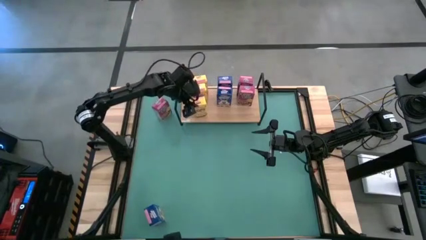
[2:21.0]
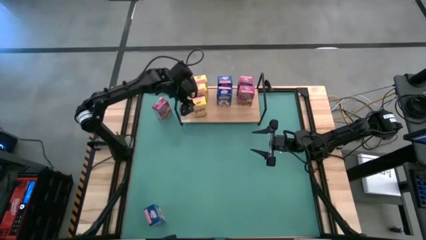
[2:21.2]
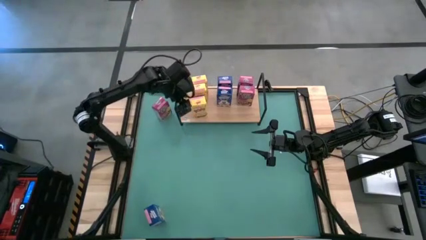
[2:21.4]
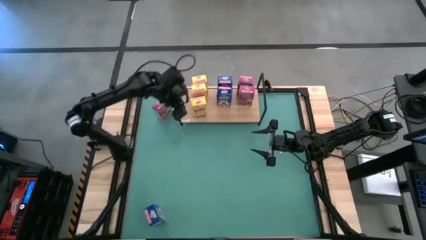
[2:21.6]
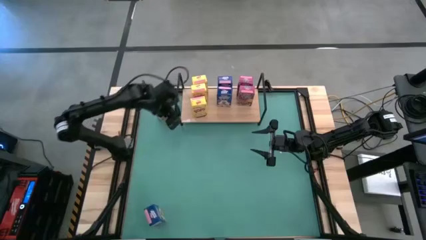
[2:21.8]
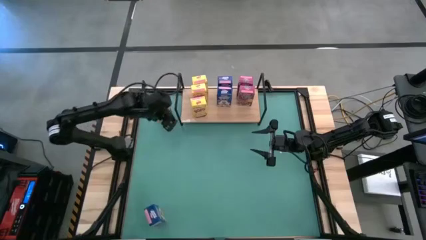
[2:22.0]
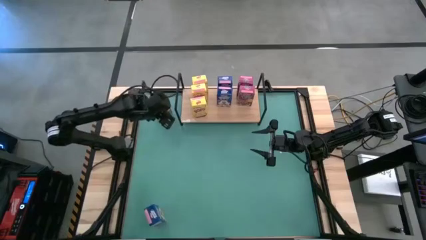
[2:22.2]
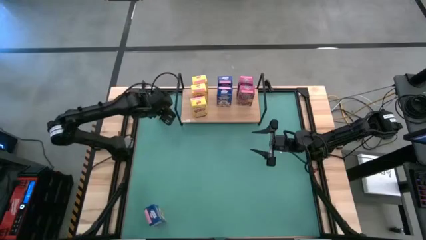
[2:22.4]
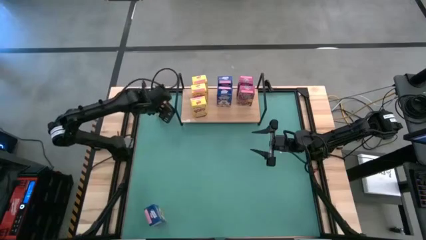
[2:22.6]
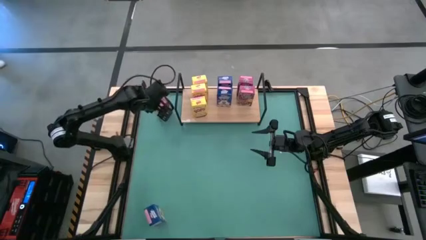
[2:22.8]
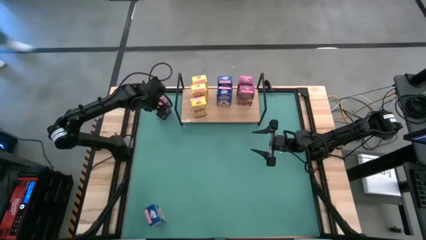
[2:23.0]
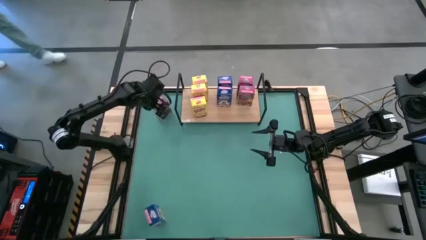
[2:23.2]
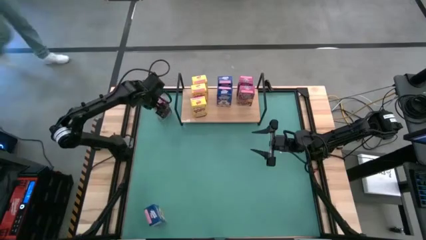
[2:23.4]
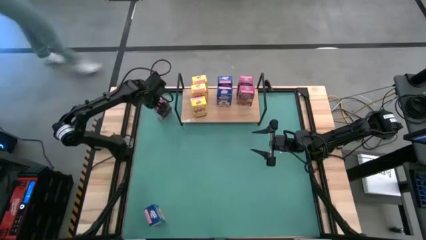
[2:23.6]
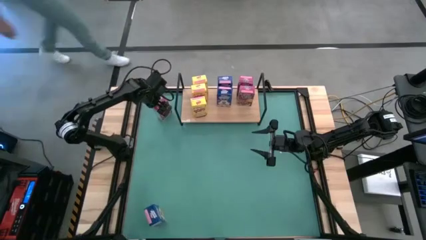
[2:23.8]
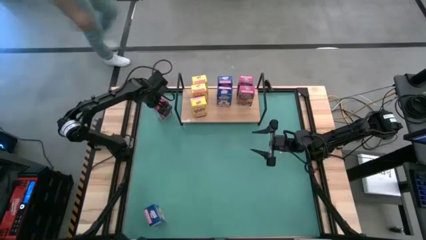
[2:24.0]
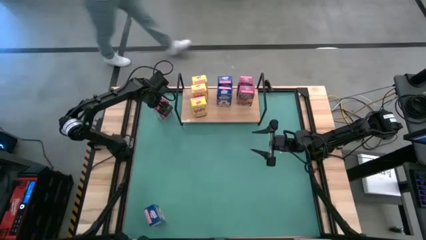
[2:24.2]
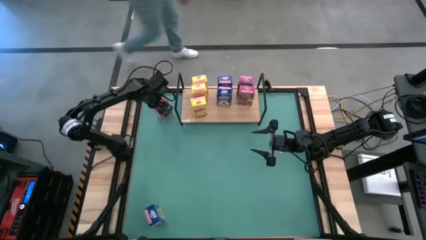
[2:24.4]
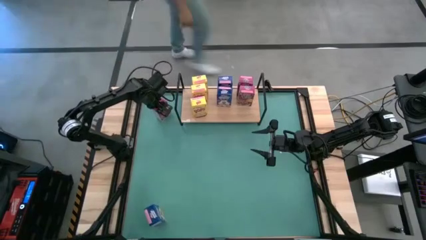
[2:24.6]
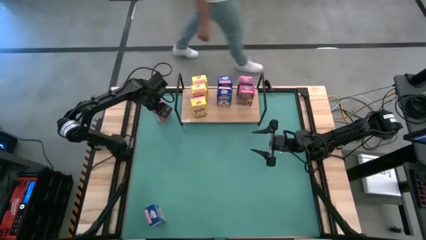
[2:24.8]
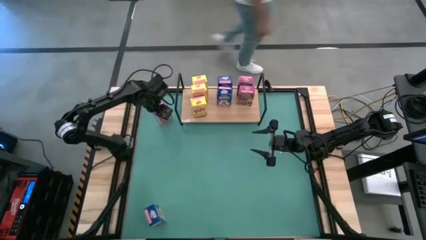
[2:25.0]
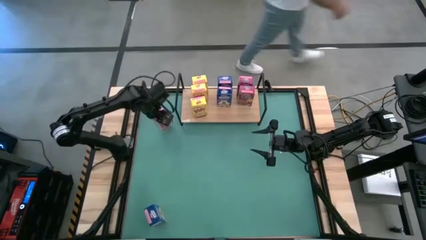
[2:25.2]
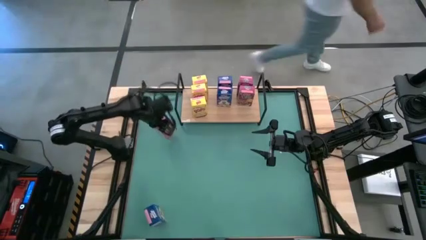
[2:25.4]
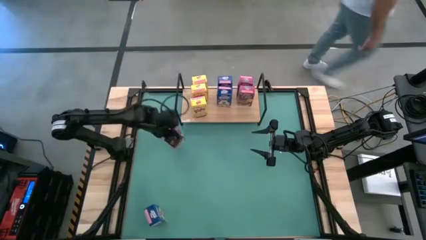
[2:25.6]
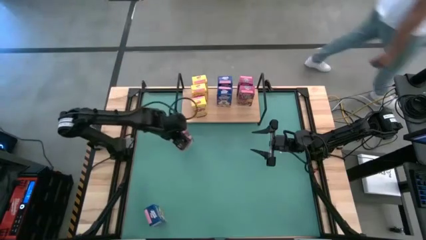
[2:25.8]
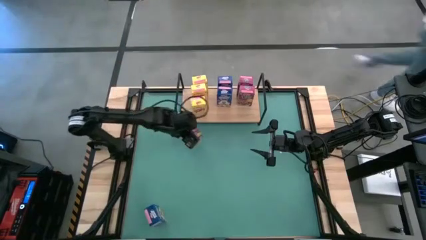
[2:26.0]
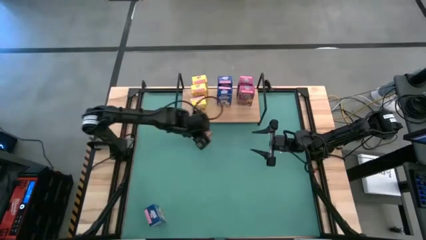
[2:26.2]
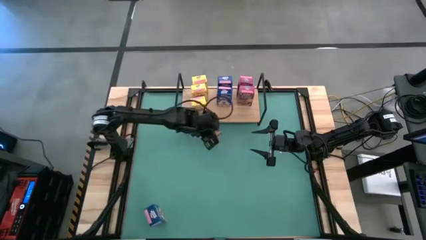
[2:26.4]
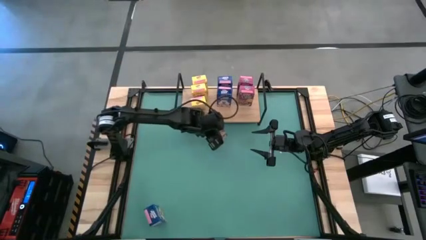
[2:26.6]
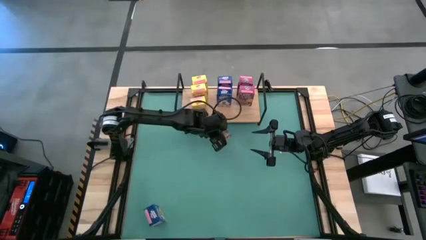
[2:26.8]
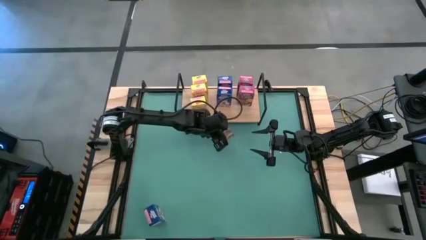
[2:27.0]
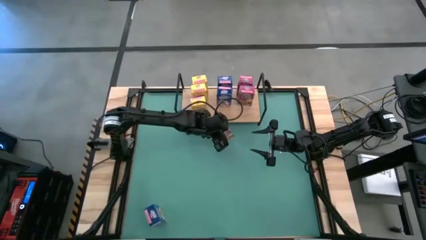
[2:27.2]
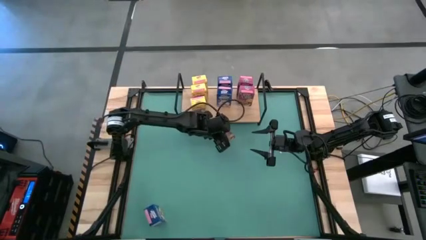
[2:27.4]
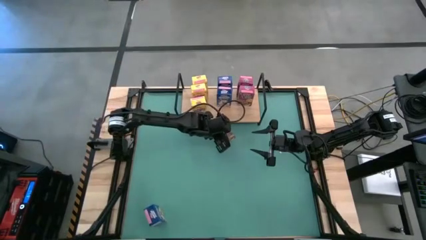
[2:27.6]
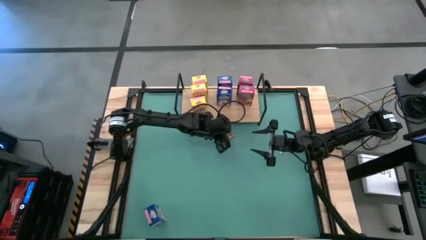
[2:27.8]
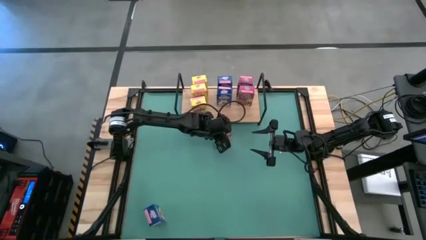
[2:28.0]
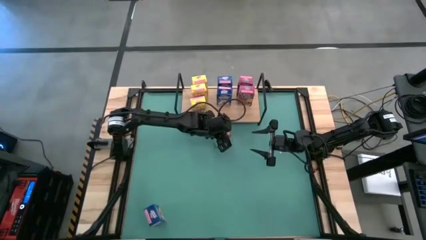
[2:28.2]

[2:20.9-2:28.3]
Task: Stack cereal on shelf
Move the pink cereal box to the center of the table

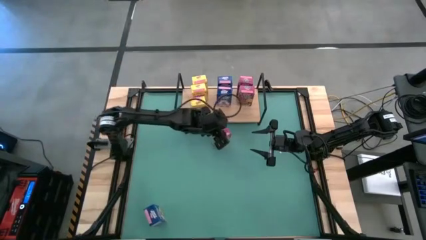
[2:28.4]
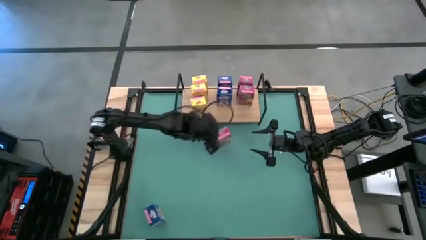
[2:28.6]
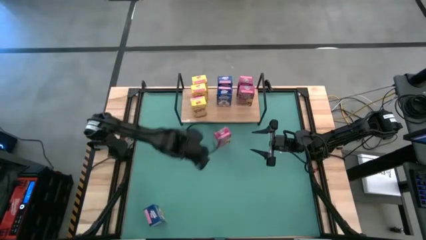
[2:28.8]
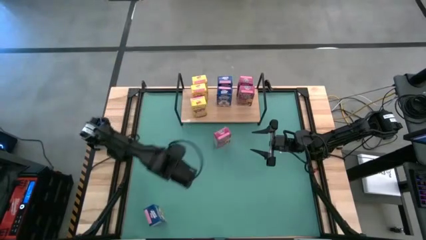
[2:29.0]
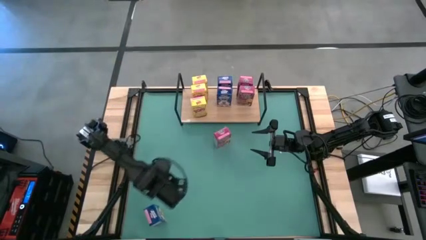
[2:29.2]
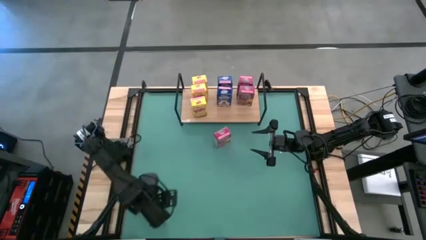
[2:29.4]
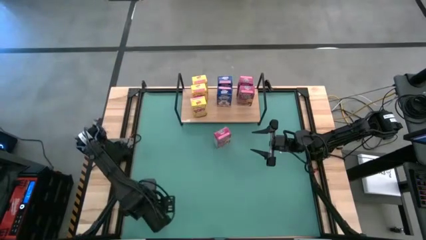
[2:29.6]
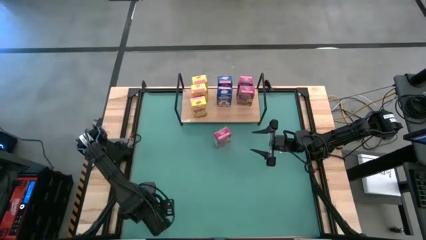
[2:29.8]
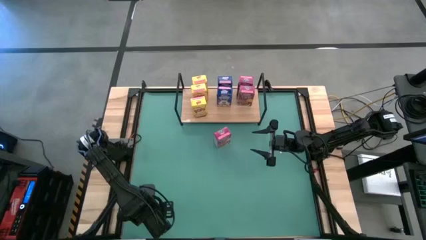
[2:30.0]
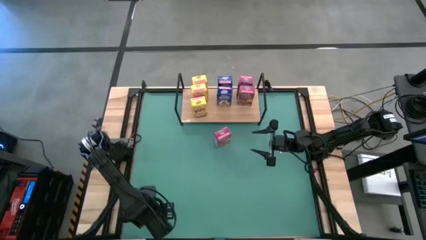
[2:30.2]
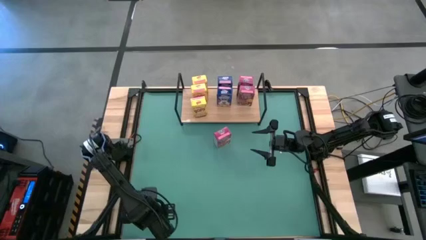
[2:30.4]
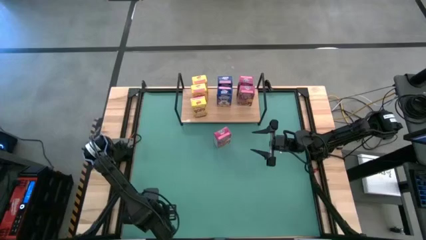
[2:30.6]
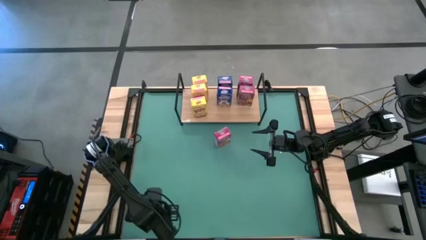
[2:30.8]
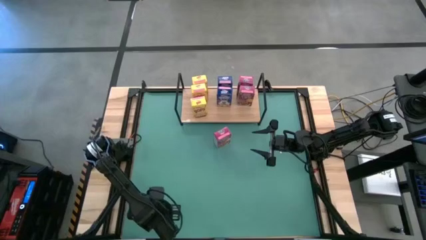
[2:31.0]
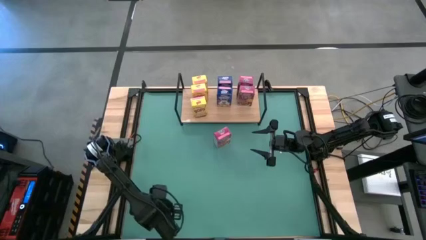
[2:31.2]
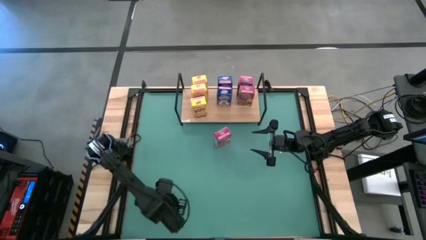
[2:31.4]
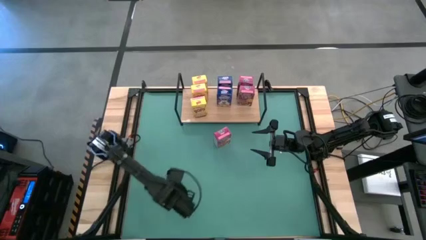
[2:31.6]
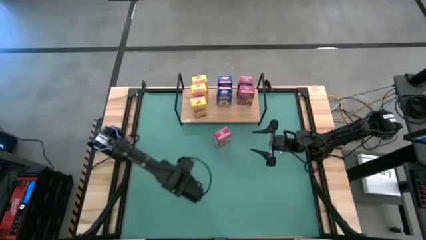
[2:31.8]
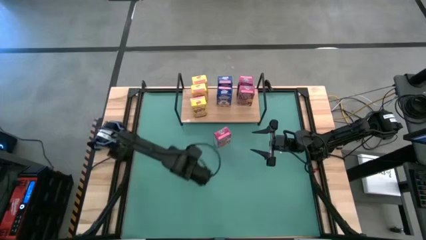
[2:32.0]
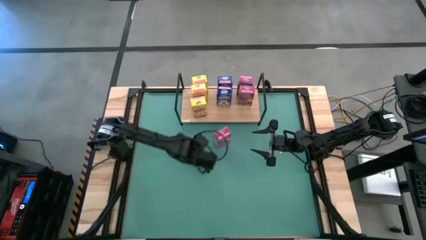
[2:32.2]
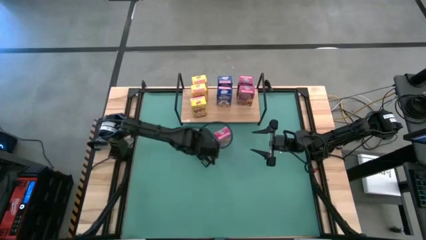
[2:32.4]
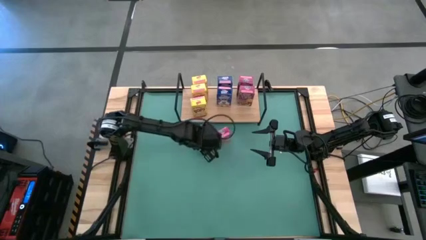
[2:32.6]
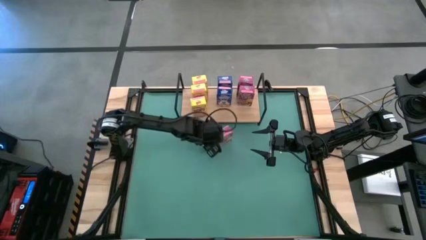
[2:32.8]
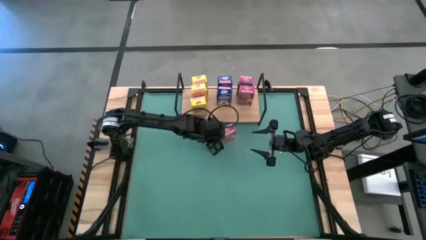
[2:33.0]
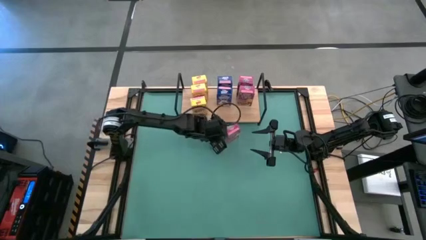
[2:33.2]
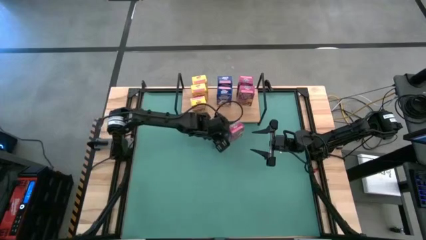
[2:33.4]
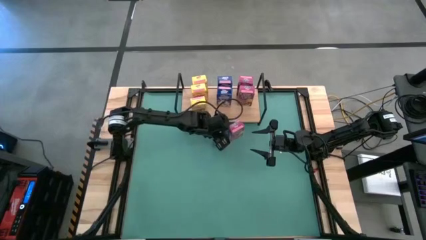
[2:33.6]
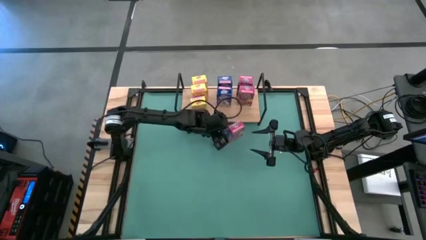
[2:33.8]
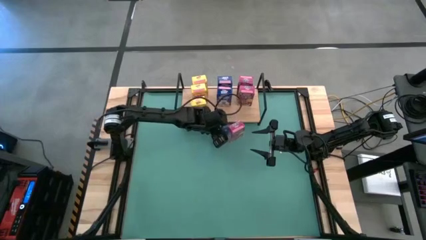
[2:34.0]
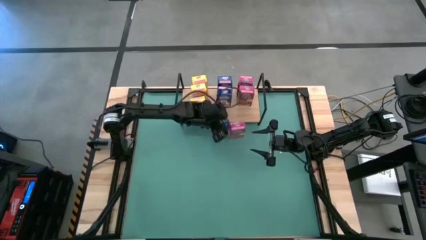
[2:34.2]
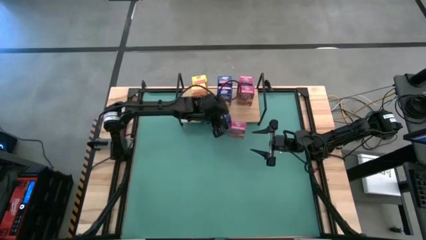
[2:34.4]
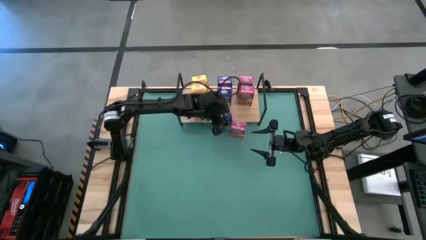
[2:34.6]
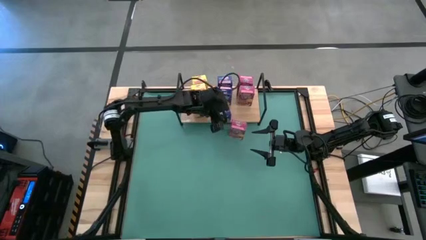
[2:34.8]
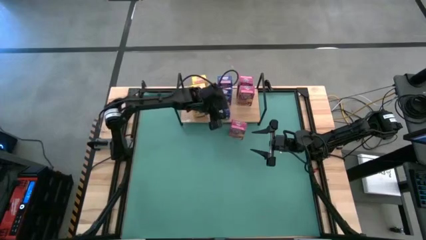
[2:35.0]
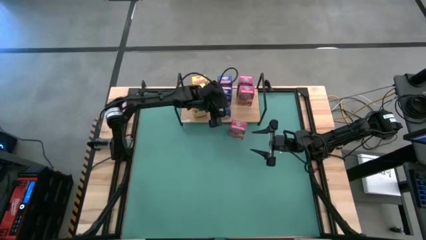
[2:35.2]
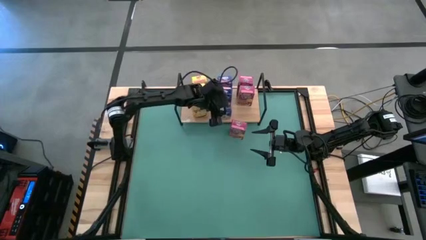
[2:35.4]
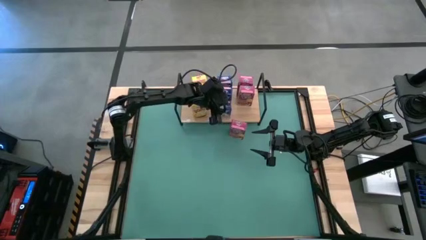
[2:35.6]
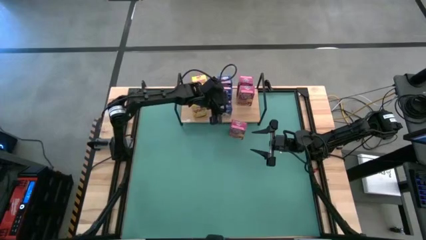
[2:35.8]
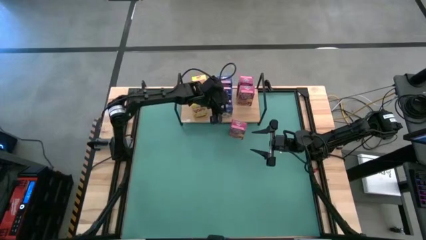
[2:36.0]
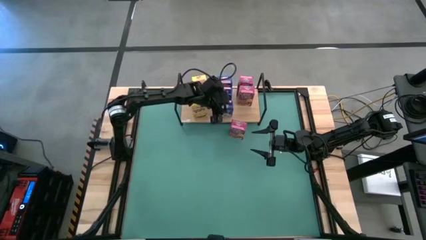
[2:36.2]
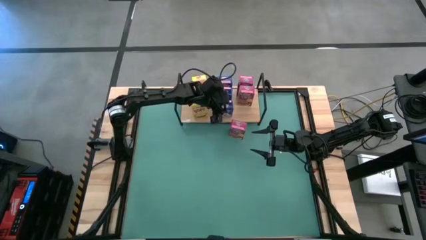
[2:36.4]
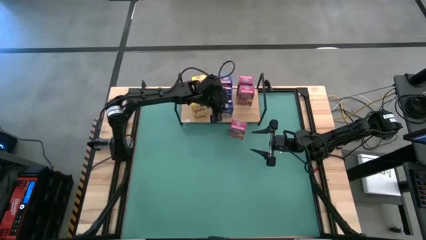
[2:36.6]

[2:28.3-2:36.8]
Put the blue cereal box on the shelf aligned with the other blue cereal boxes
